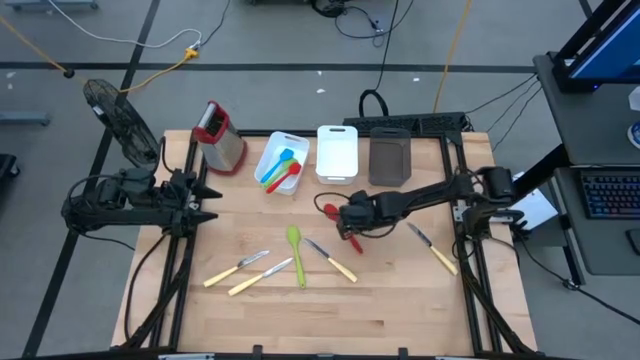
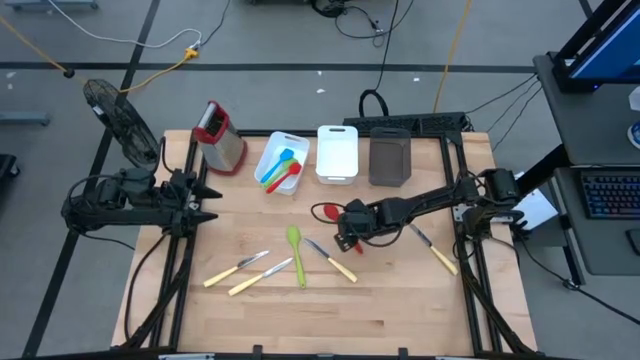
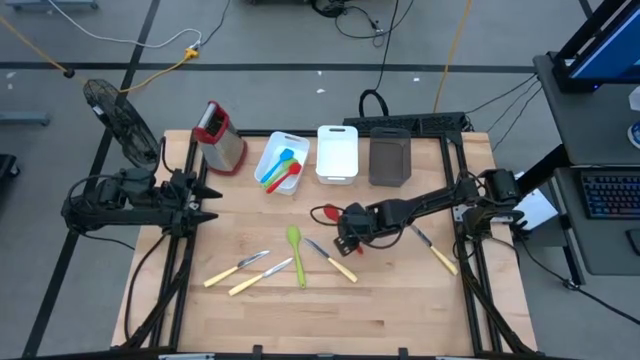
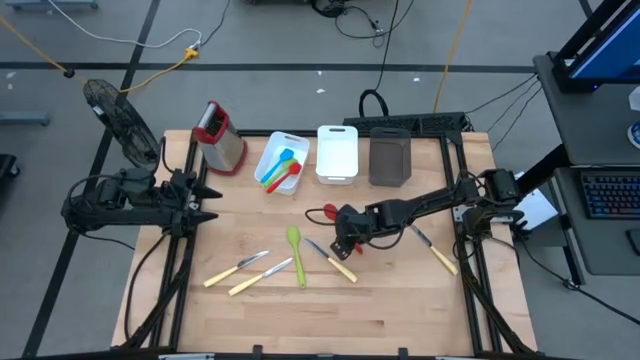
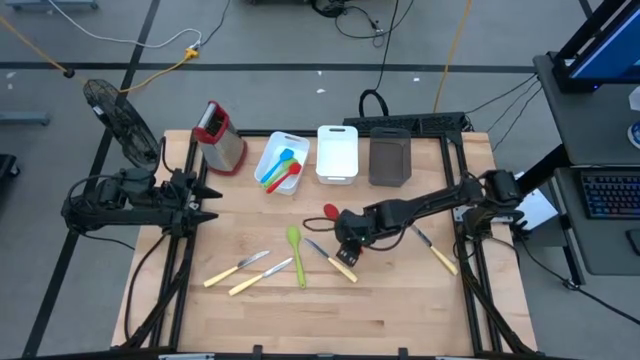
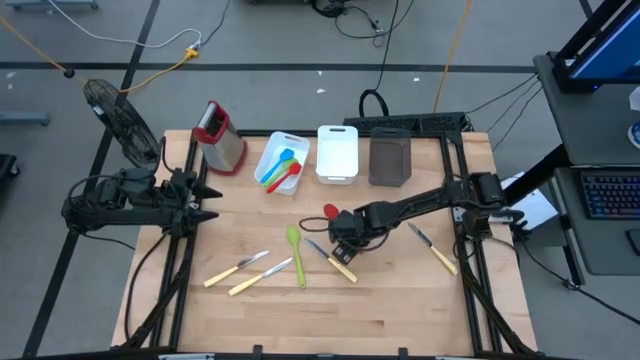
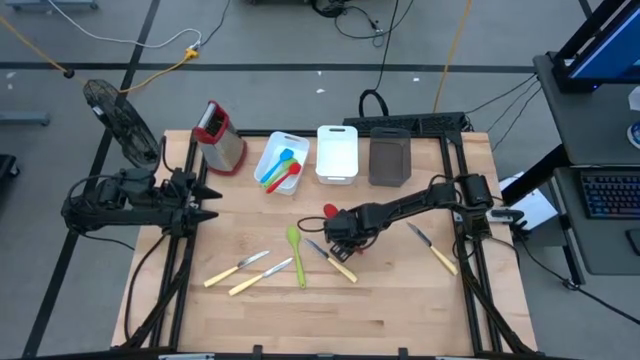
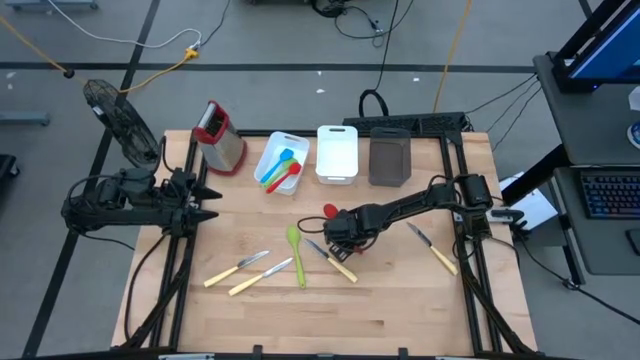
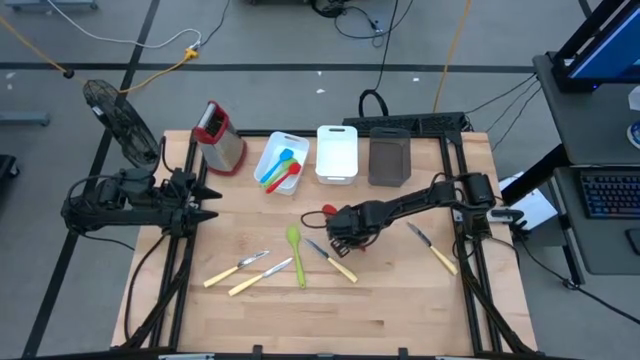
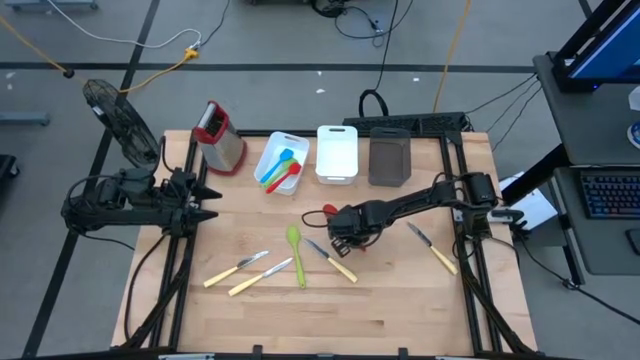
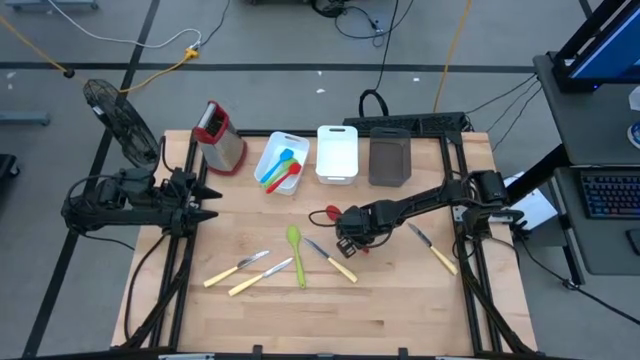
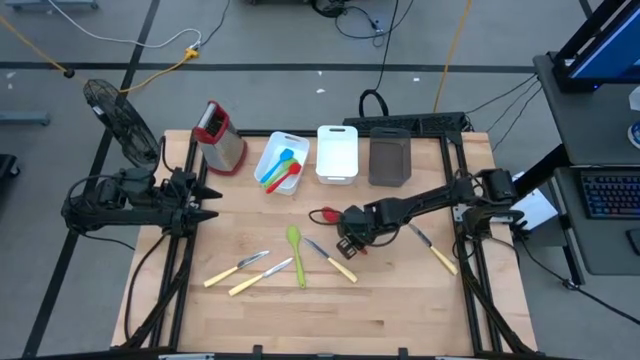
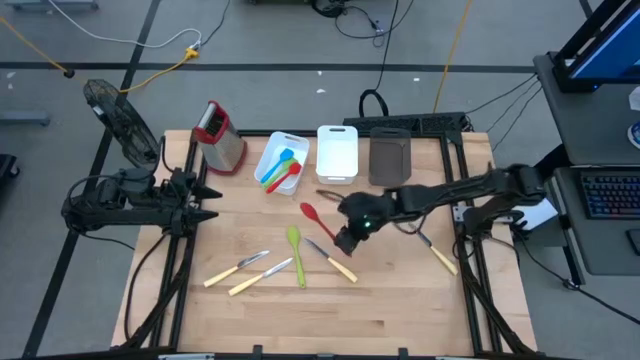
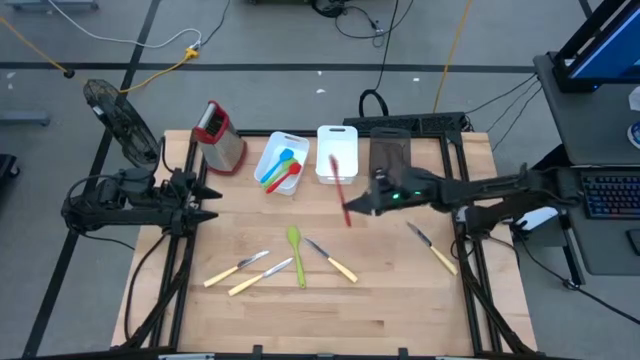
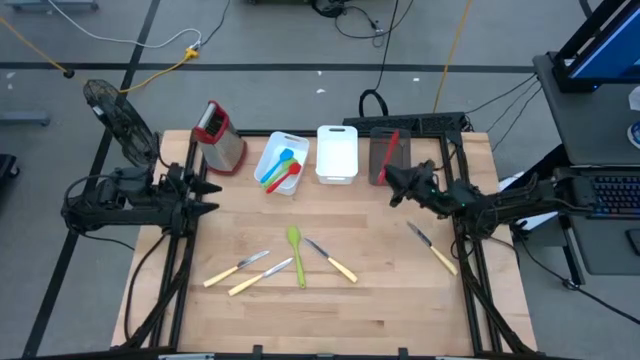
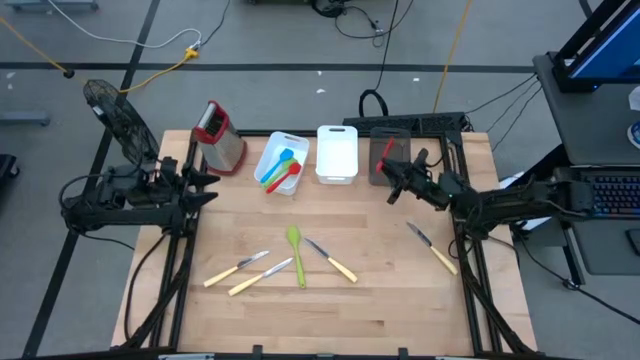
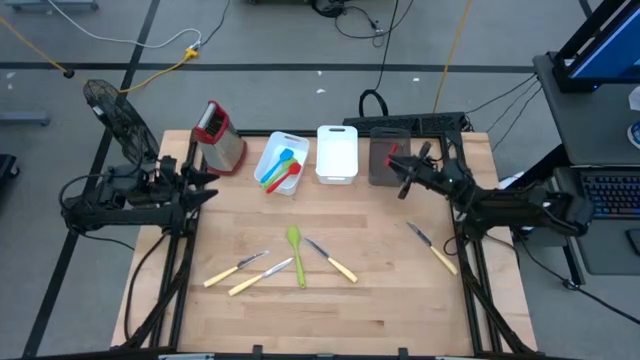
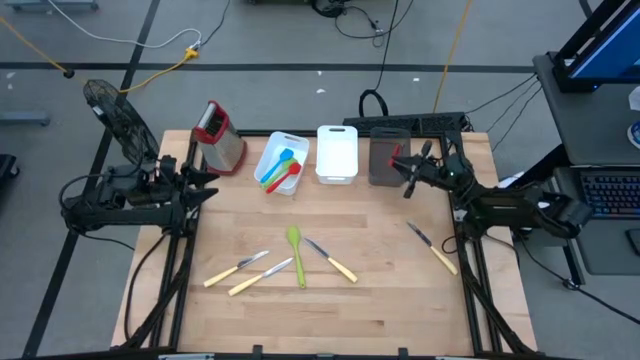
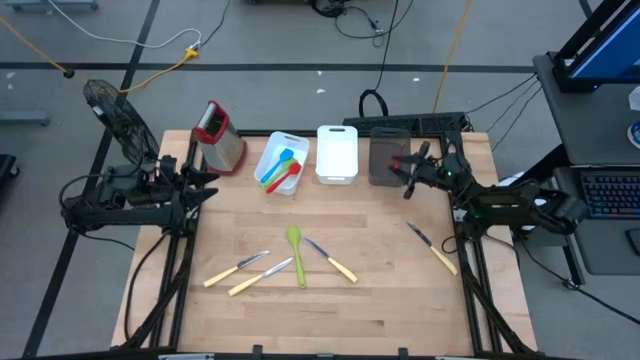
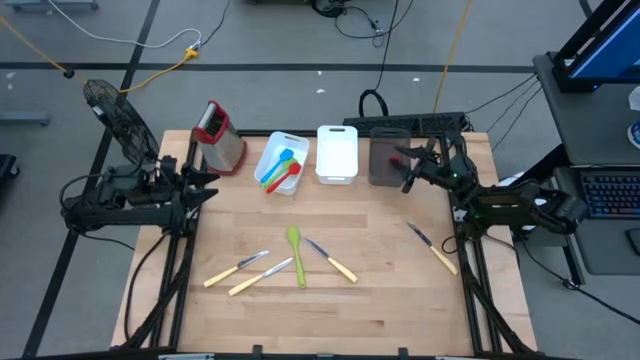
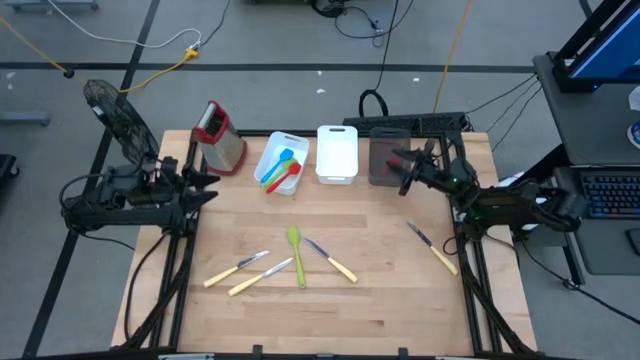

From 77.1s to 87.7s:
Task: Pick & Place Kitchen Items
Put the red serving spoon into the black bin

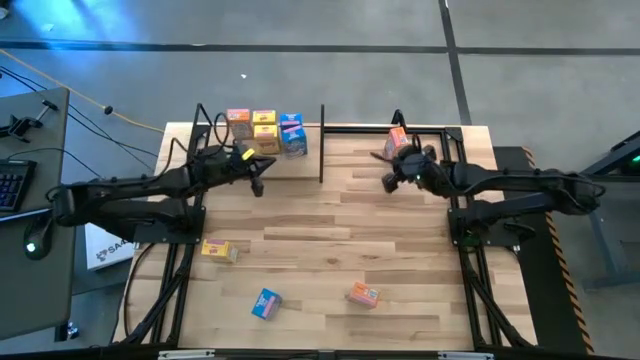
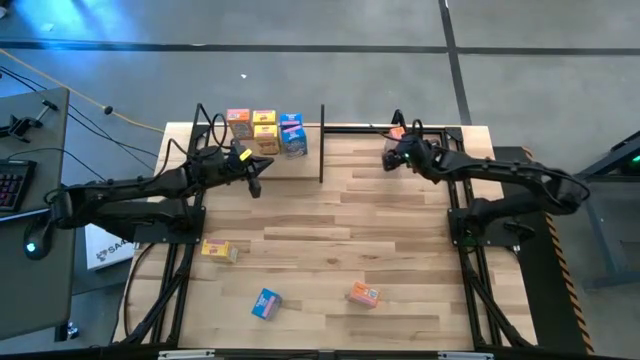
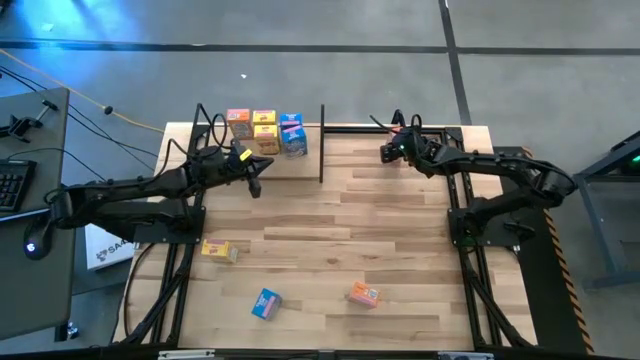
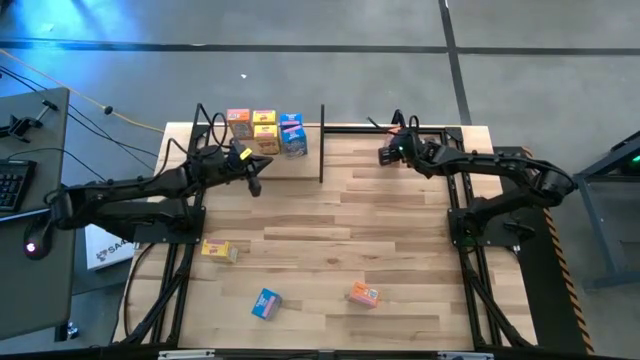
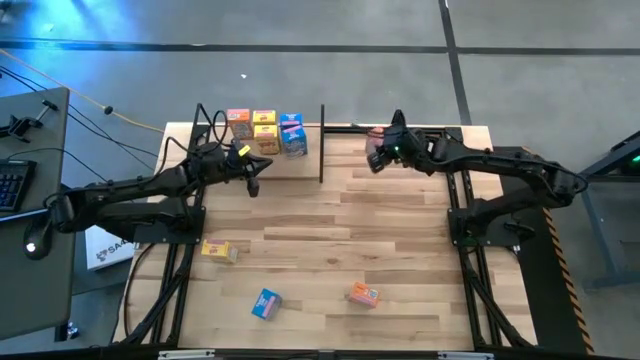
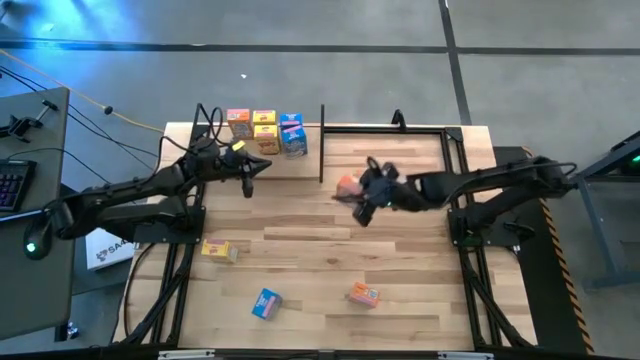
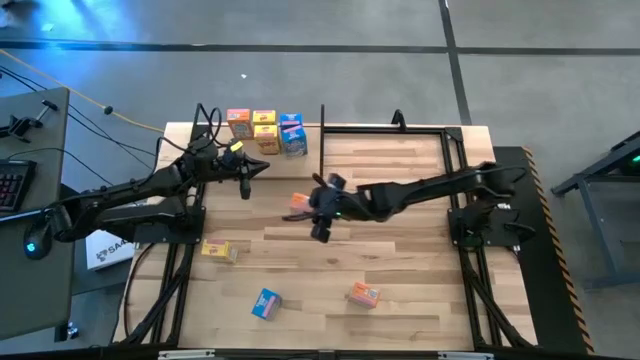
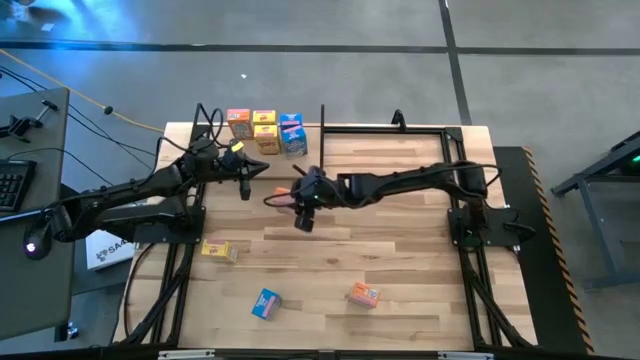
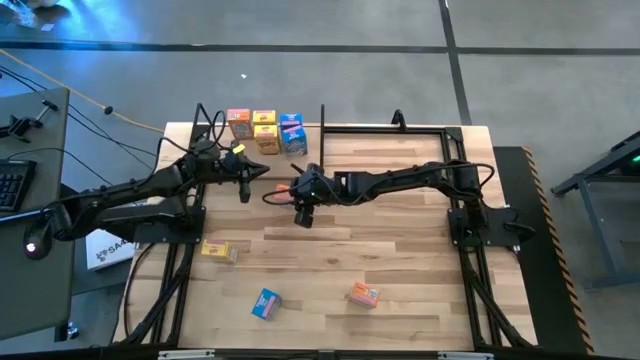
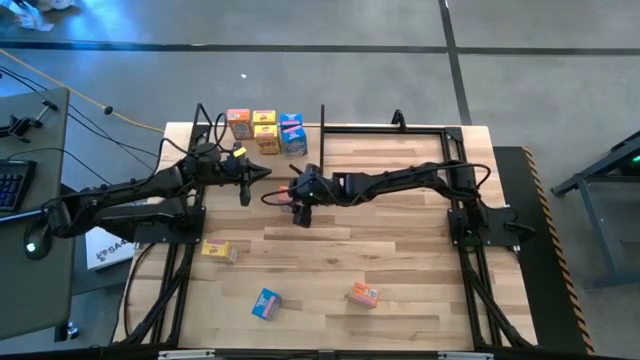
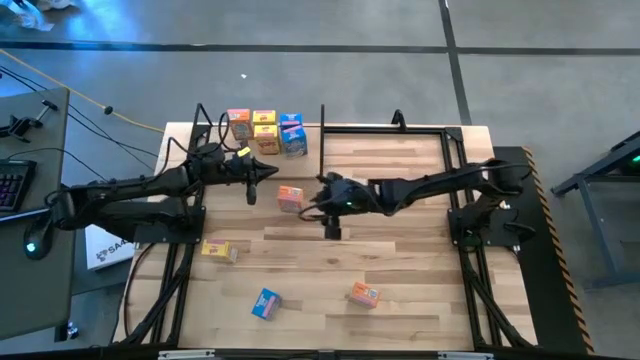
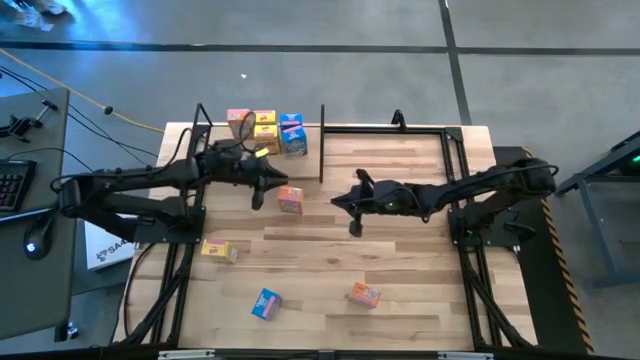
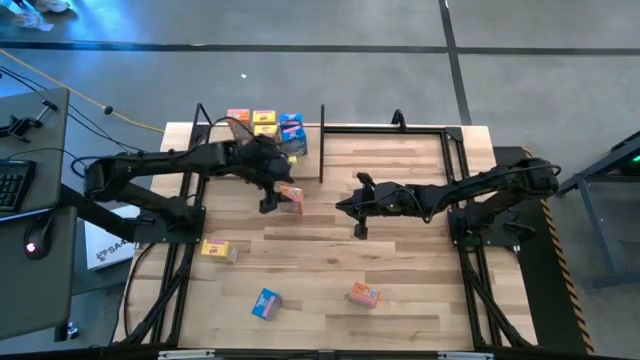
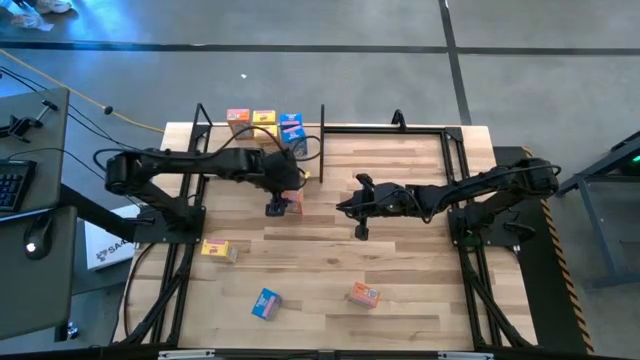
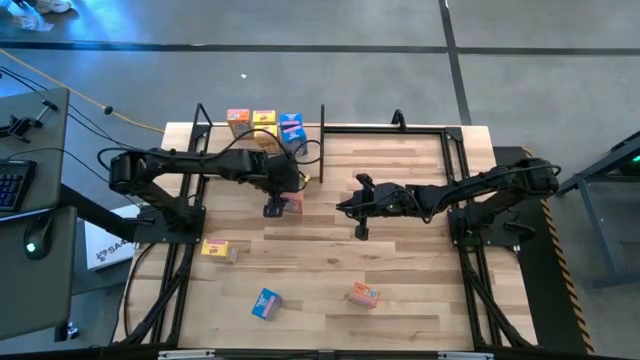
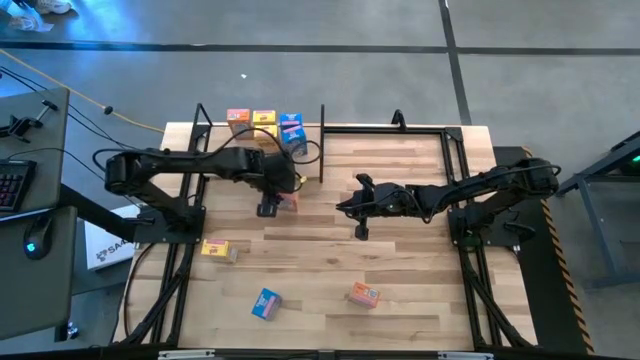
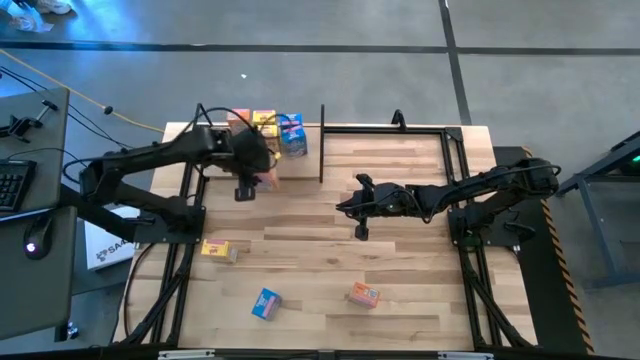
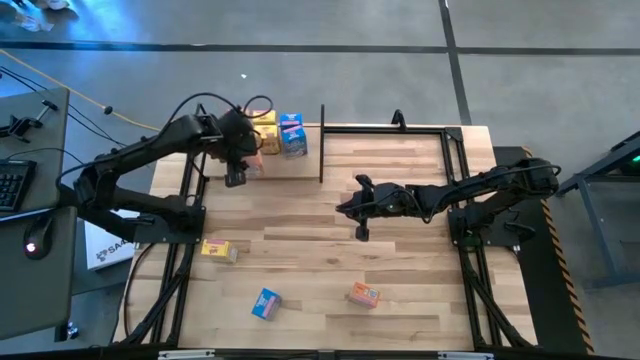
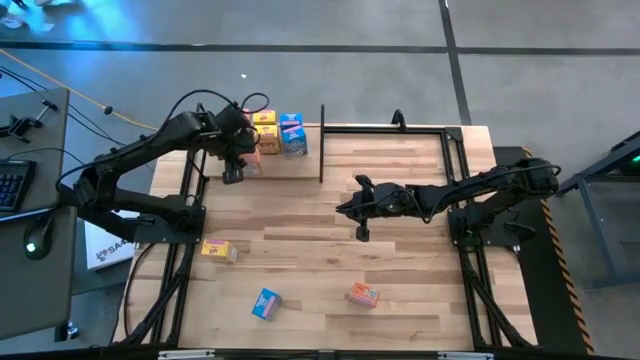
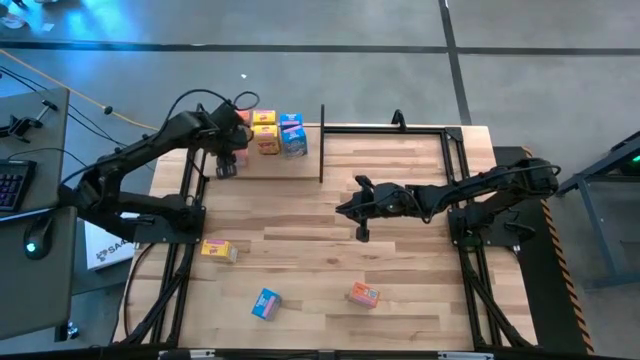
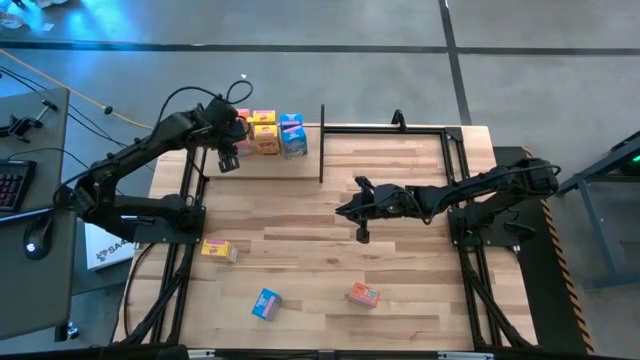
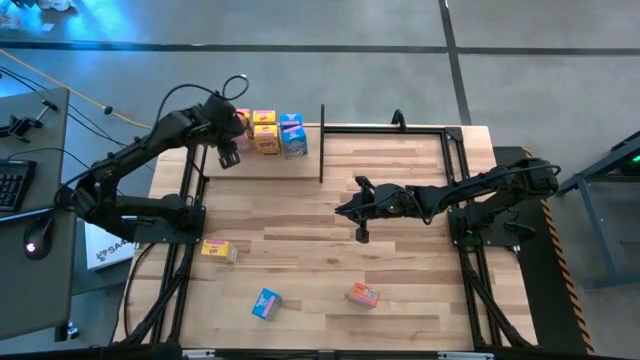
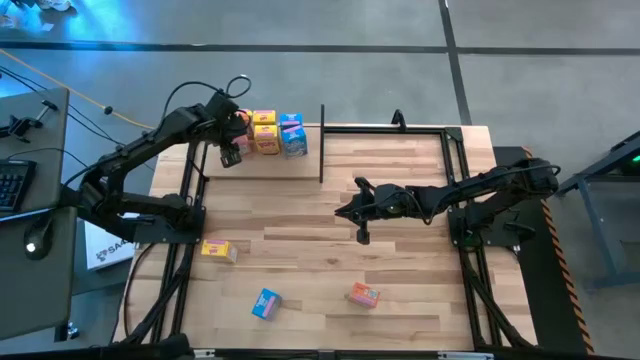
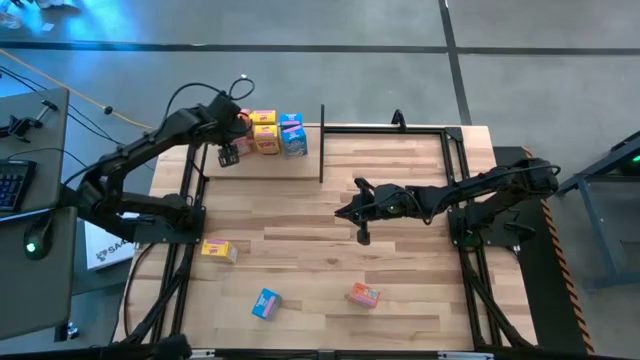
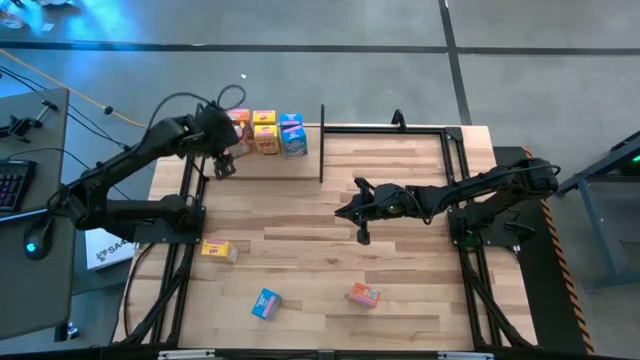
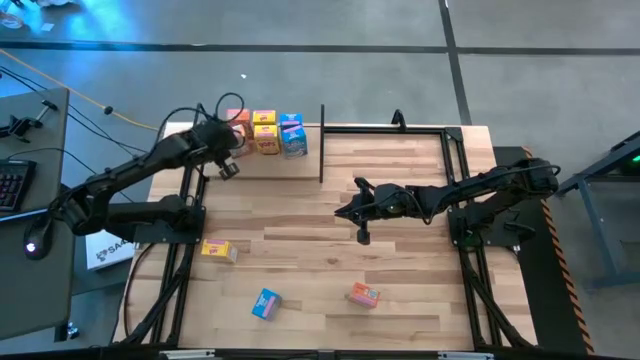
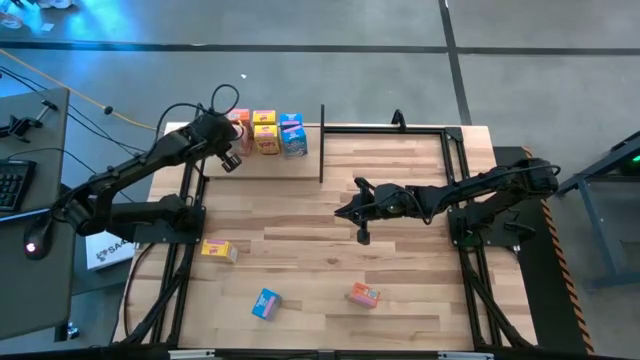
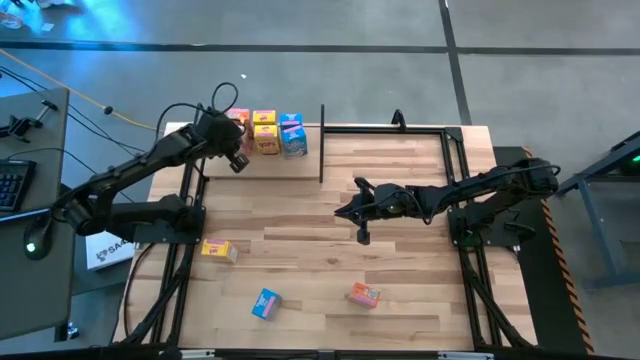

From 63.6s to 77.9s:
Task: Stack cereal on shelf
Put the top orange cereal box on the shelf aligned with the other orange cereal box
